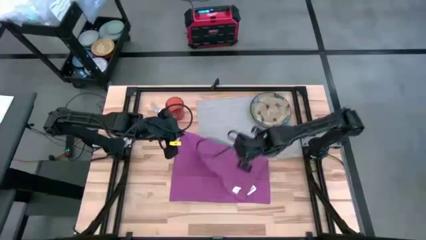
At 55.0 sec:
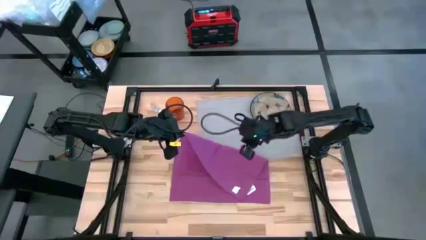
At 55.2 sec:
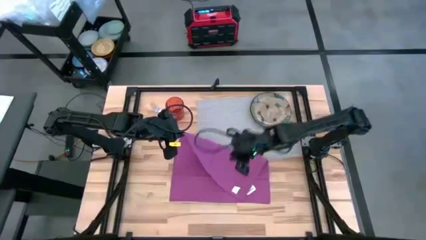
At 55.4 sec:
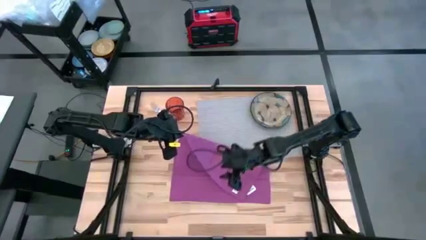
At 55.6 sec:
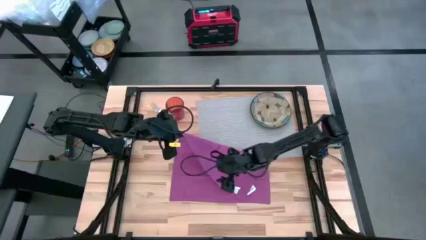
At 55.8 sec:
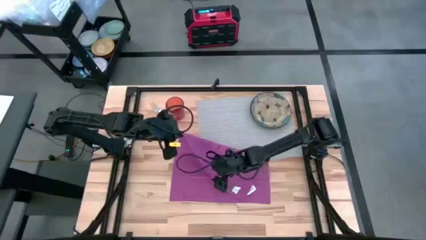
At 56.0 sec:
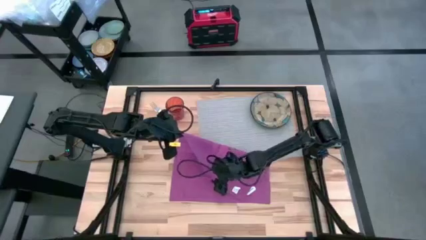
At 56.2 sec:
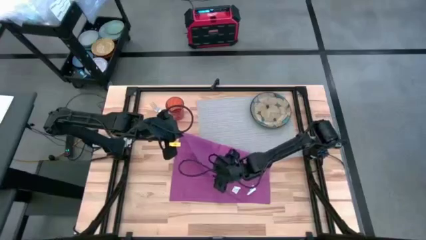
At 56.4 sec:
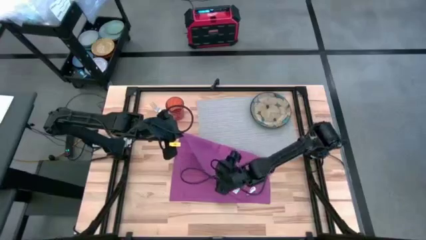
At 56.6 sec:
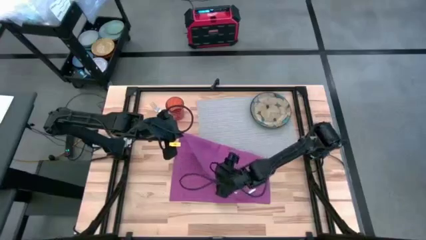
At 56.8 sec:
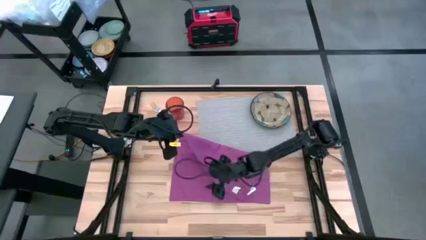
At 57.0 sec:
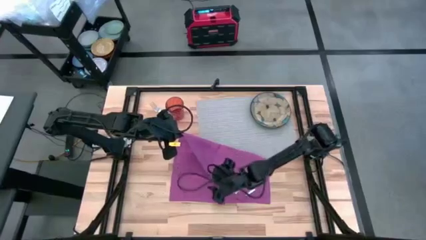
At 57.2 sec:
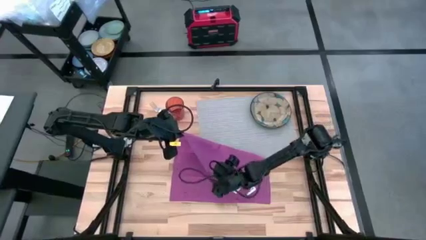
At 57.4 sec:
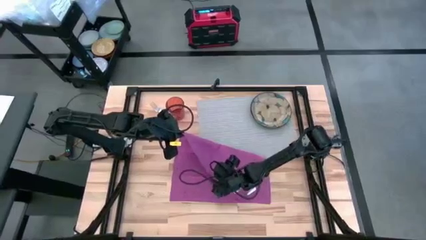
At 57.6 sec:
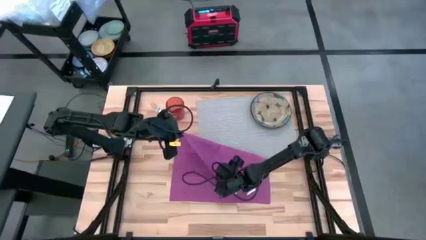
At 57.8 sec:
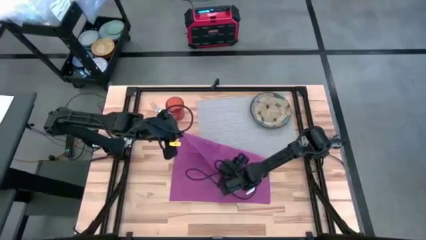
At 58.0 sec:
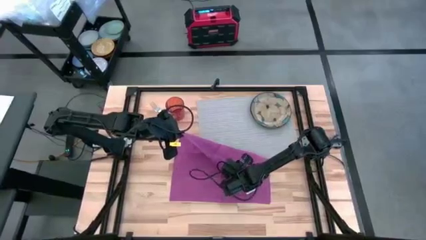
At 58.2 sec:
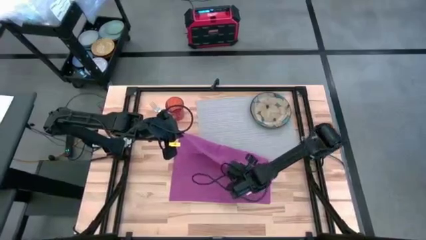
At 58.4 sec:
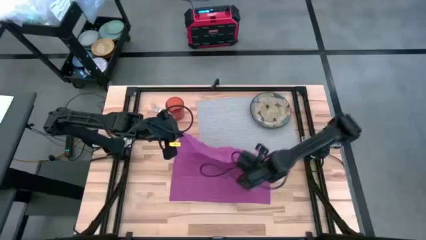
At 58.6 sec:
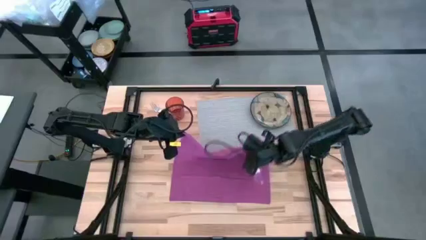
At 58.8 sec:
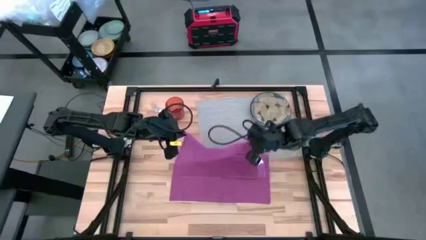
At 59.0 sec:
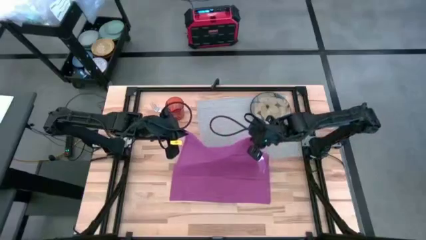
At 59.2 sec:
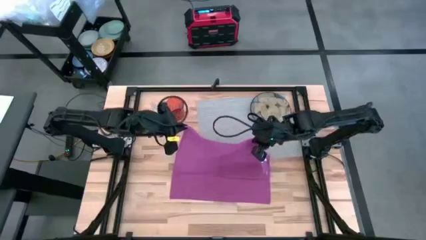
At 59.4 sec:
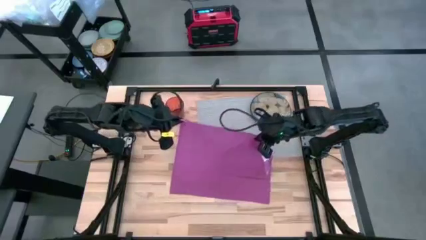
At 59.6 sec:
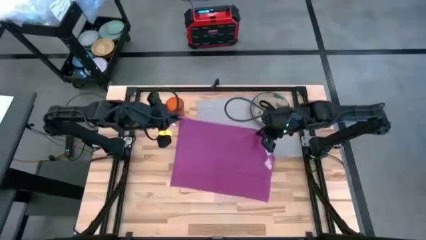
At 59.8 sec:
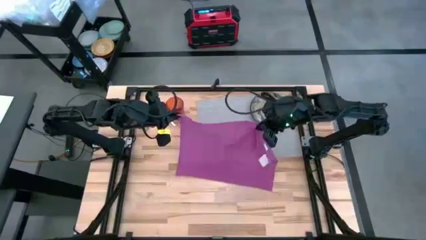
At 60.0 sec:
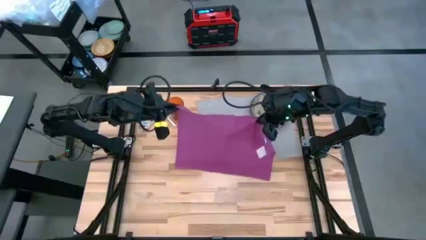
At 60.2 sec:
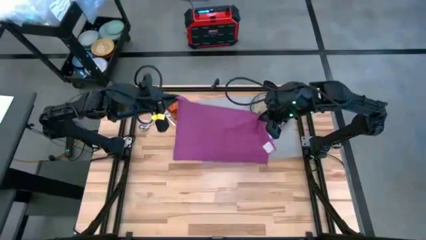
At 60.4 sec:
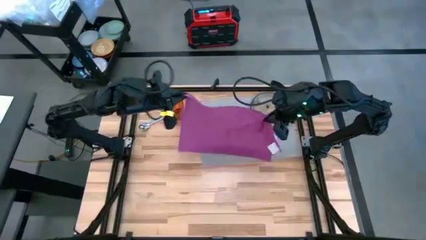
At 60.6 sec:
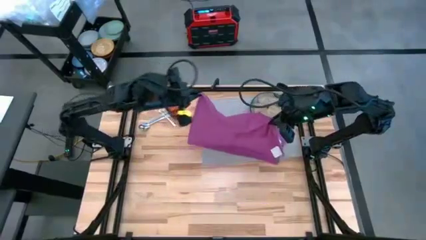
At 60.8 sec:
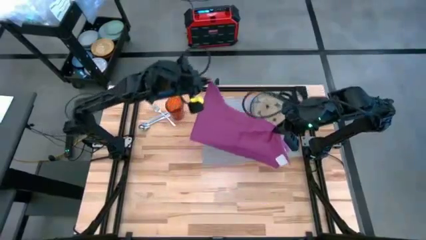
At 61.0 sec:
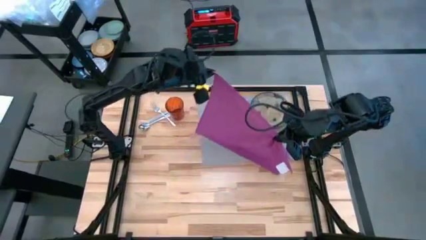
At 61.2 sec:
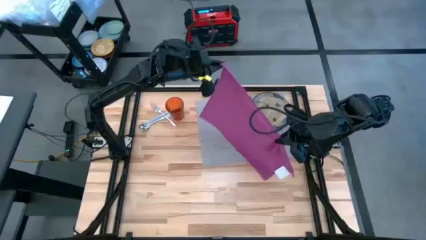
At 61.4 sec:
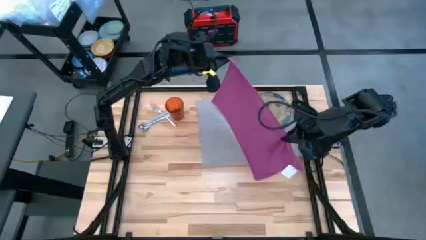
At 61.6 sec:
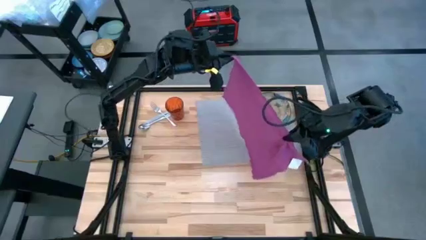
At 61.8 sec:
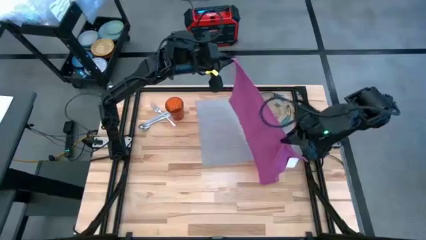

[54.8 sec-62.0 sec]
Task: Set table place
Fold the purple napkin
